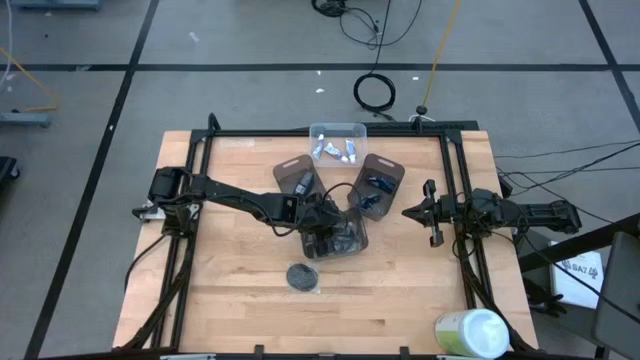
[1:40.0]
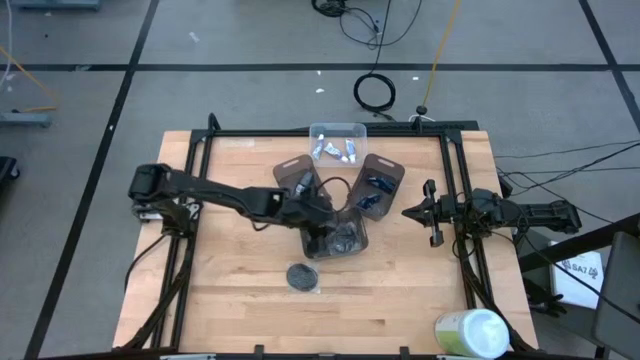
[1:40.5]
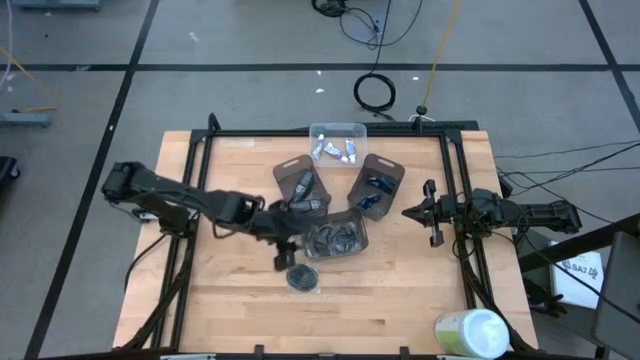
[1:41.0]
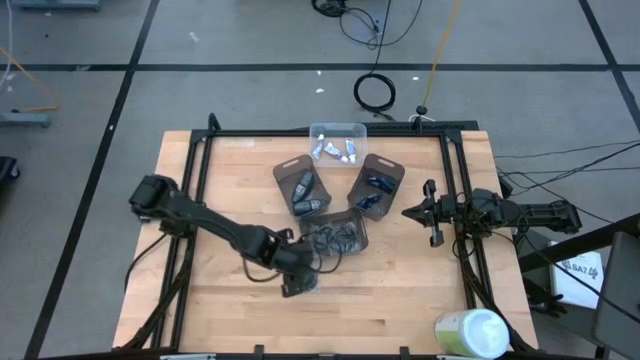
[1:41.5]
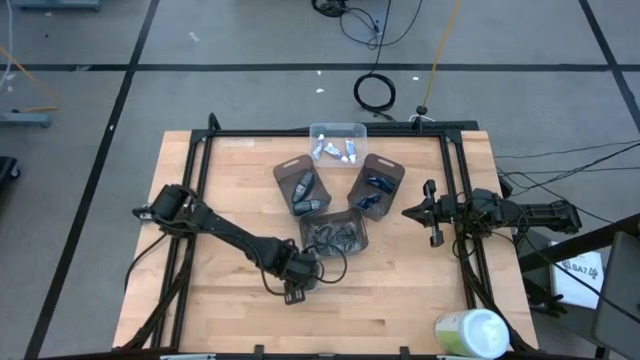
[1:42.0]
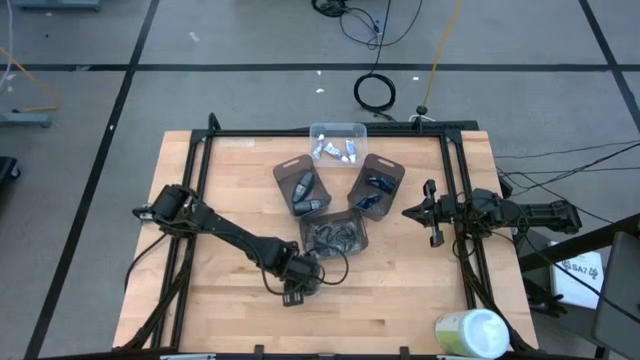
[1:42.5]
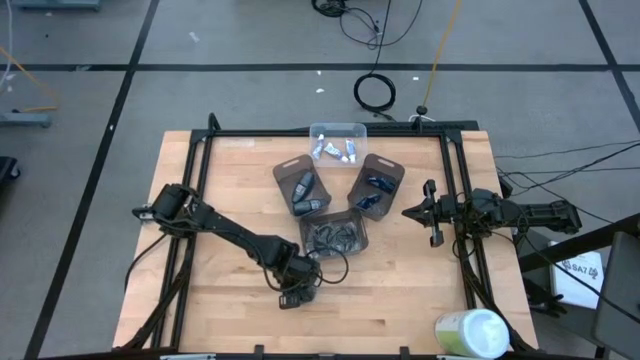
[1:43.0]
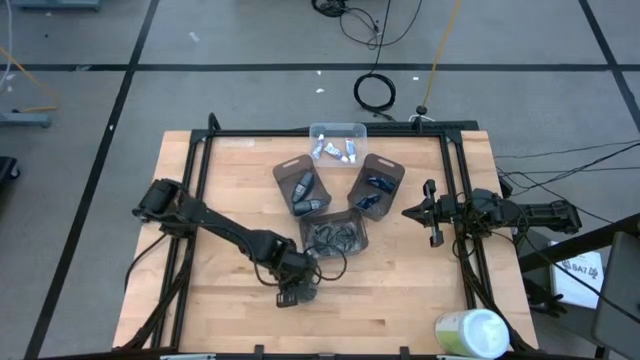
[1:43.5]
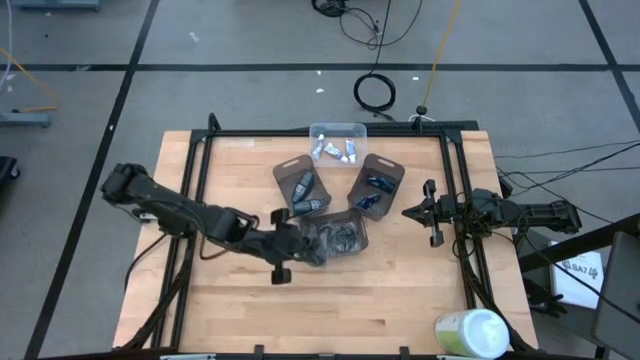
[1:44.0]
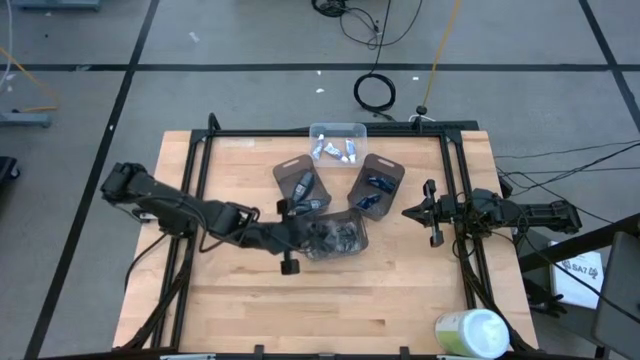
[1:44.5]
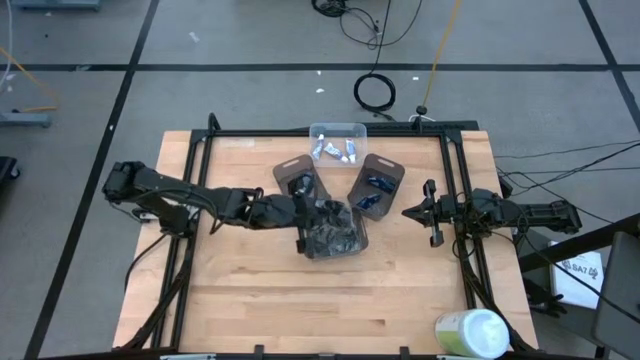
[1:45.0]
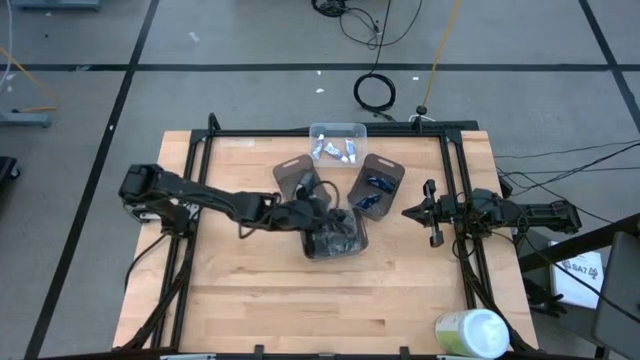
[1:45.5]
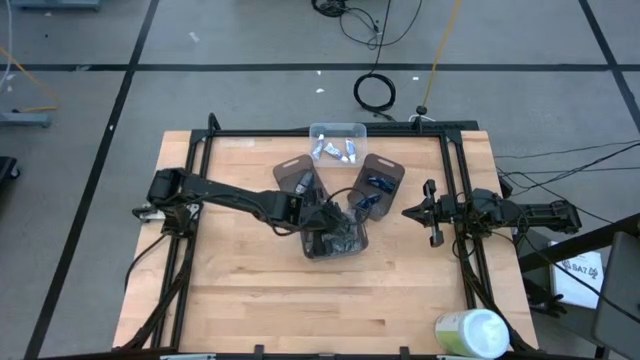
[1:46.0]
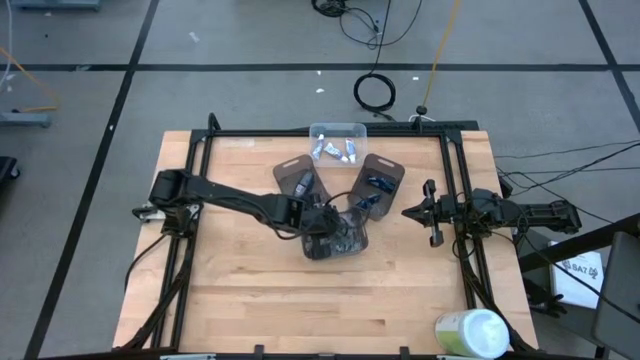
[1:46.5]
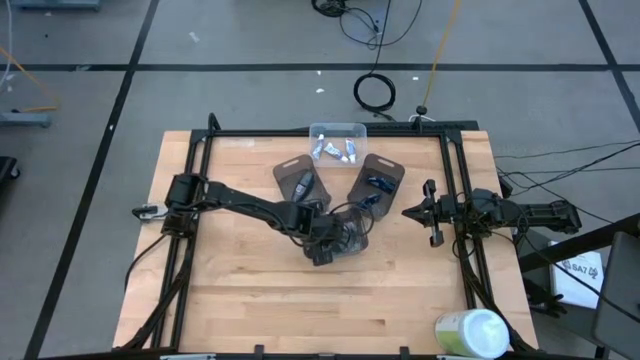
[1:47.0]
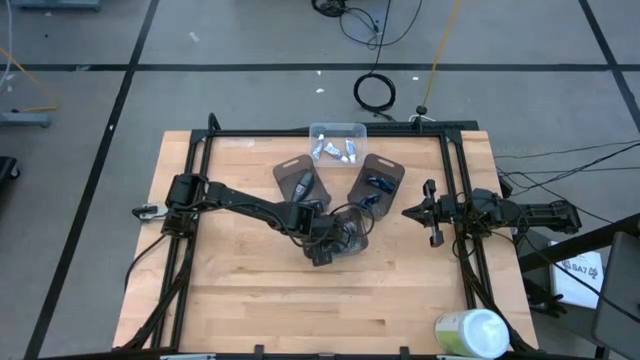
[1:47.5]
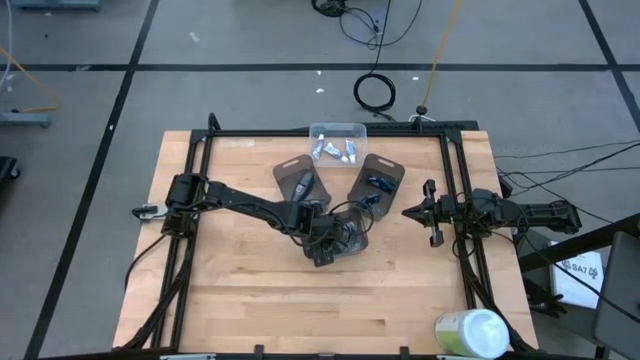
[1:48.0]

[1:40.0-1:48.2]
Task: Pick & Place Travel size toiletries
Put the black hairbrush into the bottom black transparent bin

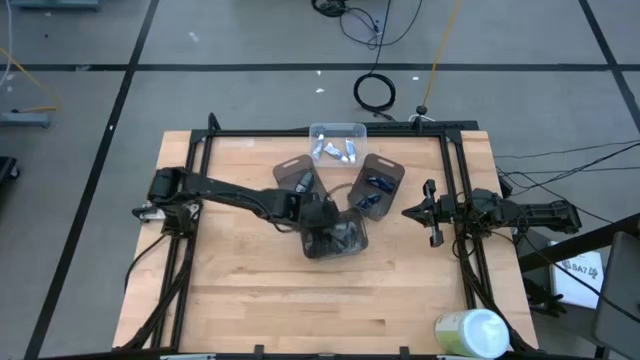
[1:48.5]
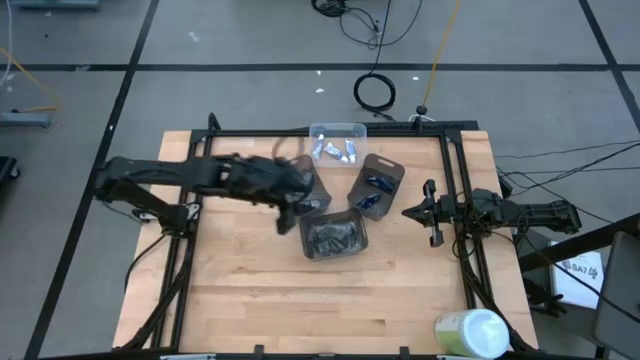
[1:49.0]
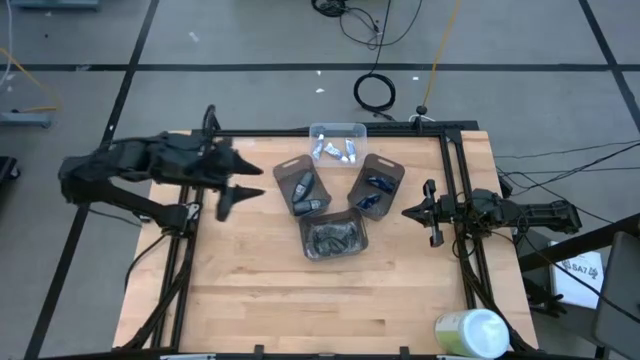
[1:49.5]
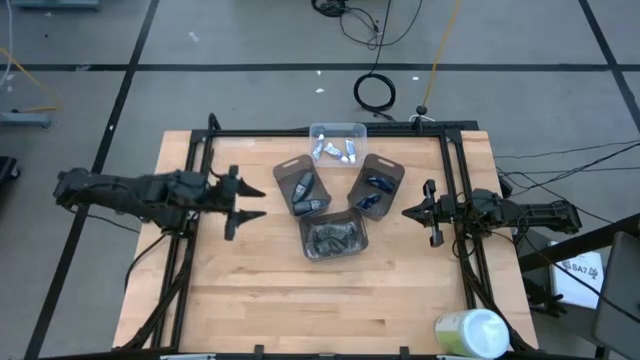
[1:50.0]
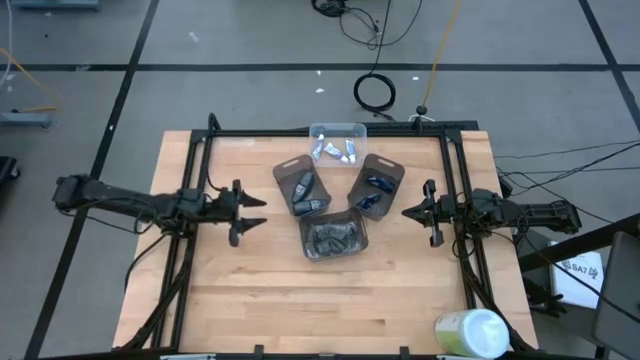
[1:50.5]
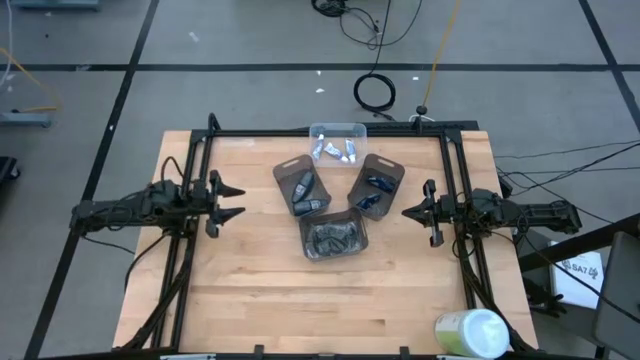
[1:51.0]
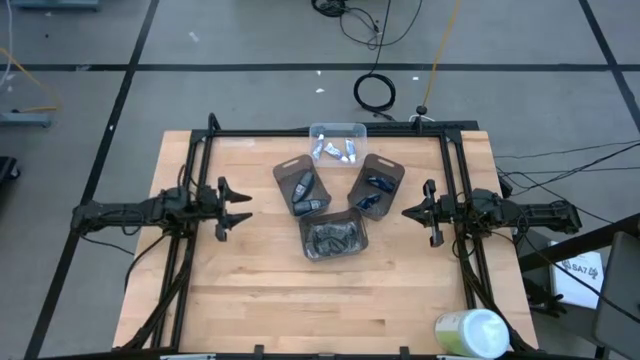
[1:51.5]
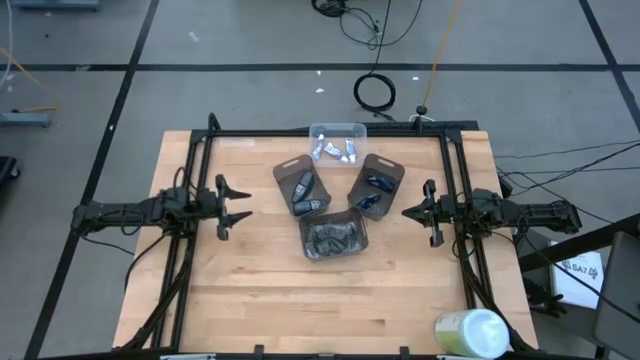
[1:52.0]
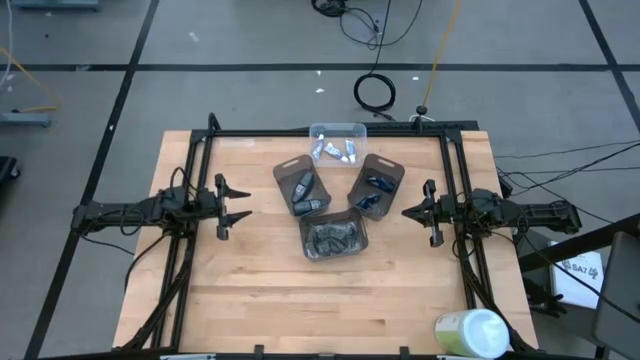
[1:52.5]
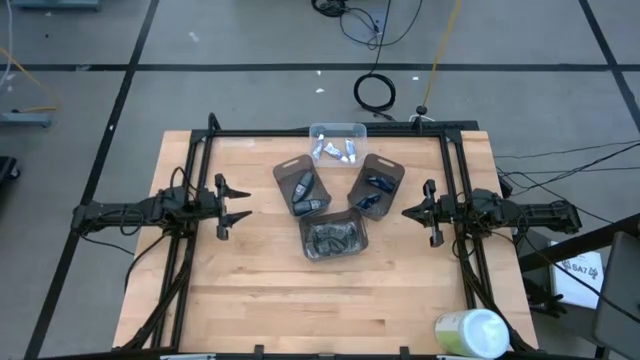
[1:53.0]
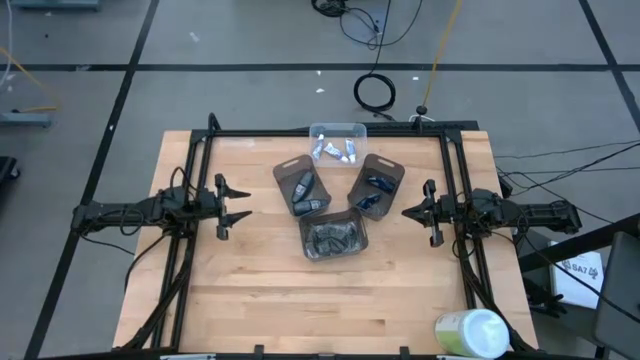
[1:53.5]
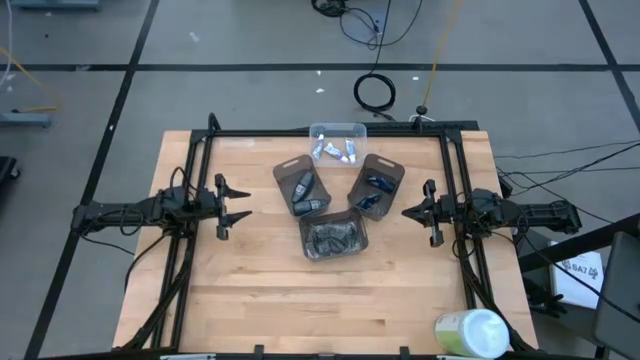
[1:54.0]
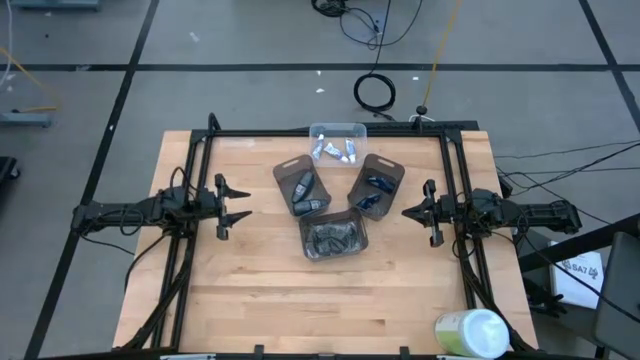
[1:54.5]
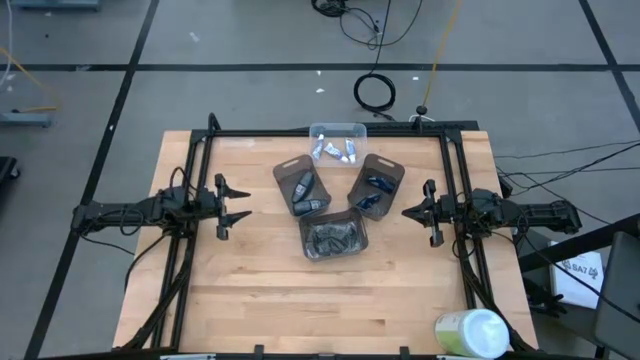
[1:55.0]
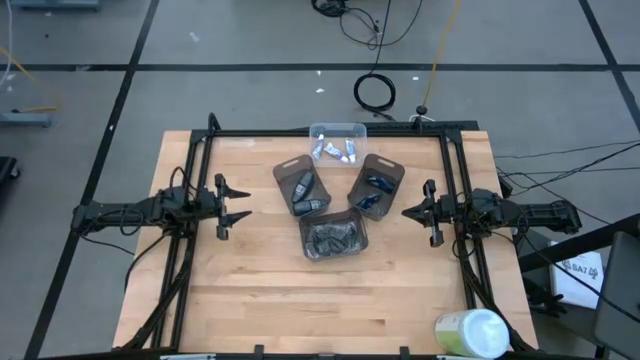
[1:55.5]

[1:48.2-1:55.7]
Return to Home Position

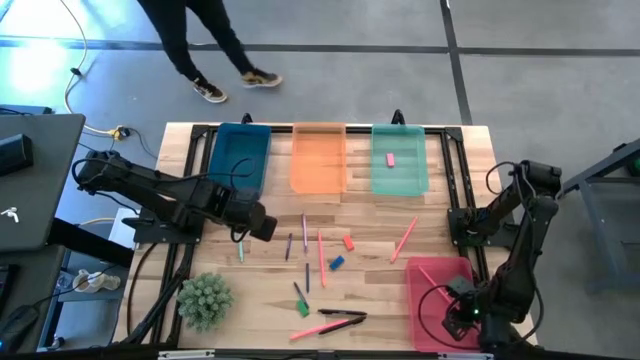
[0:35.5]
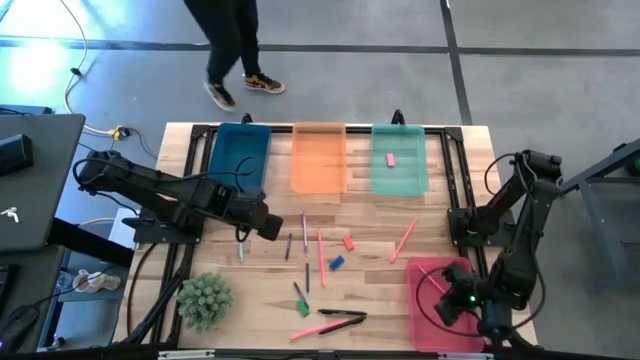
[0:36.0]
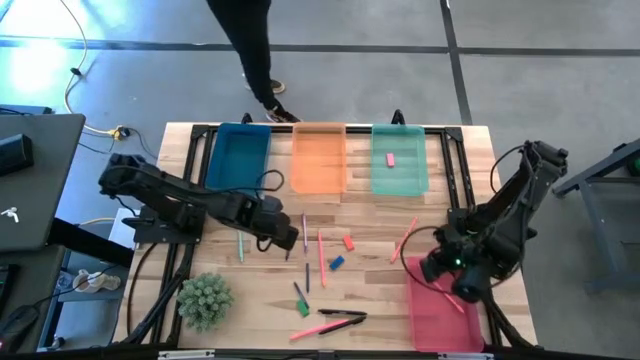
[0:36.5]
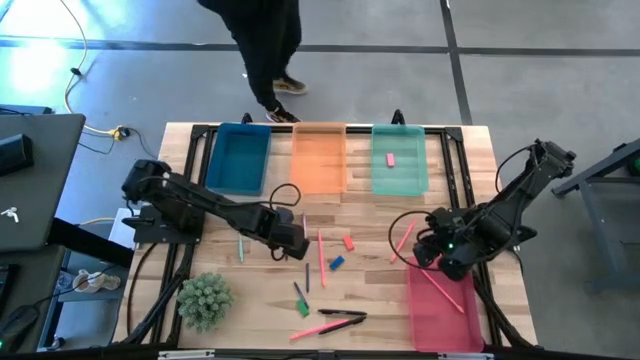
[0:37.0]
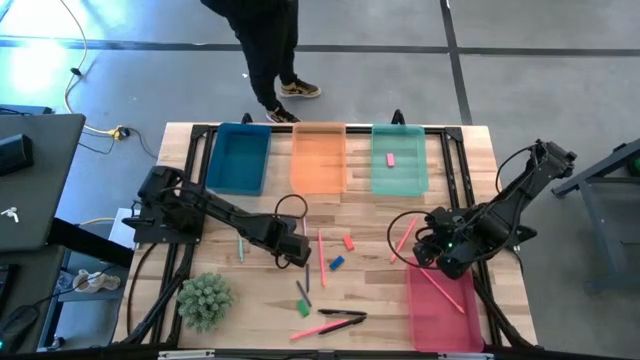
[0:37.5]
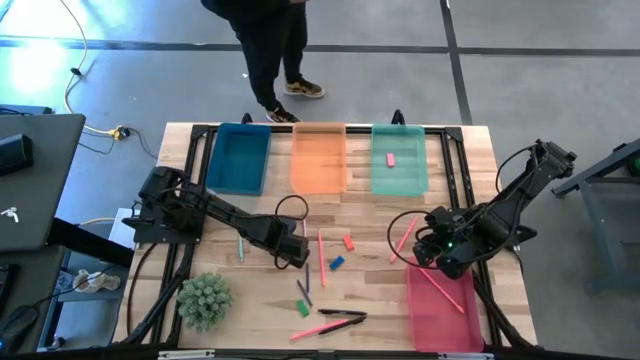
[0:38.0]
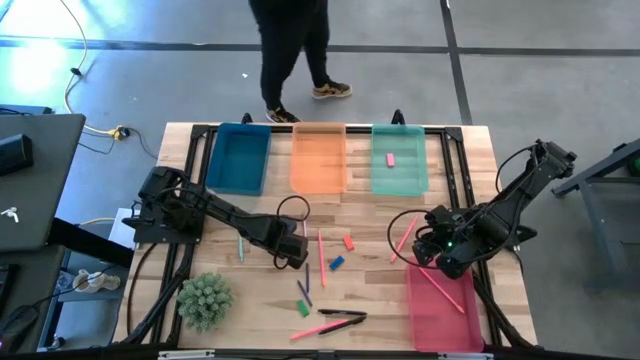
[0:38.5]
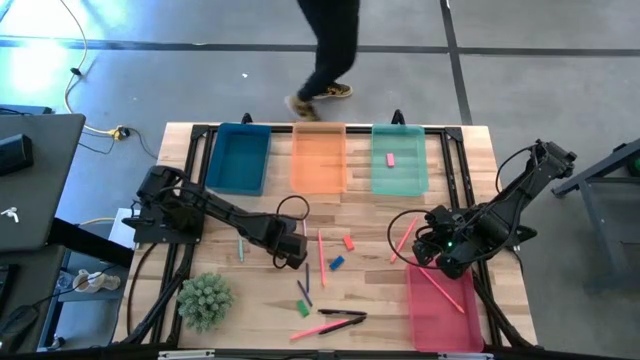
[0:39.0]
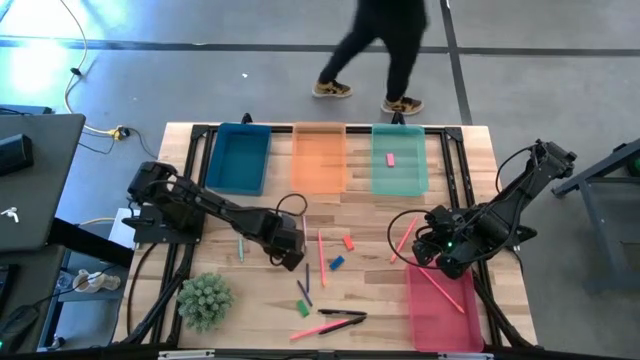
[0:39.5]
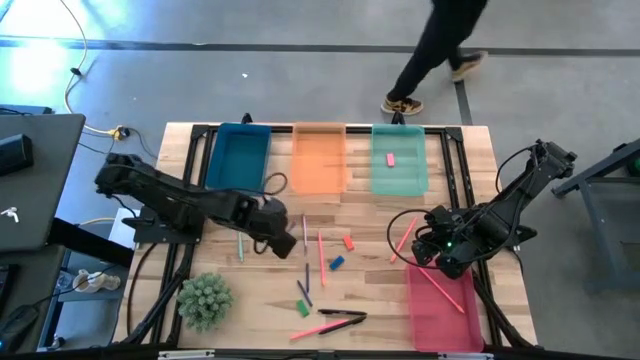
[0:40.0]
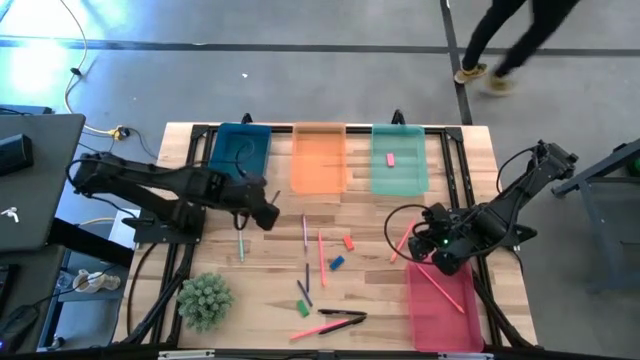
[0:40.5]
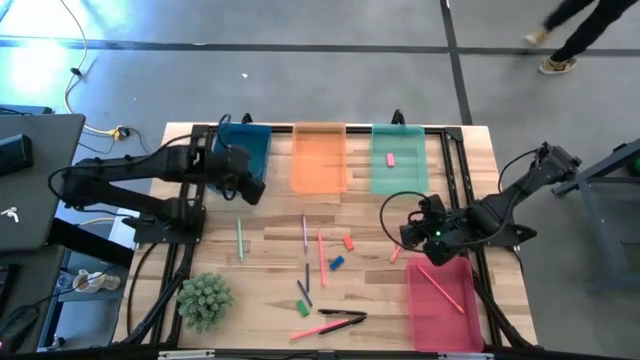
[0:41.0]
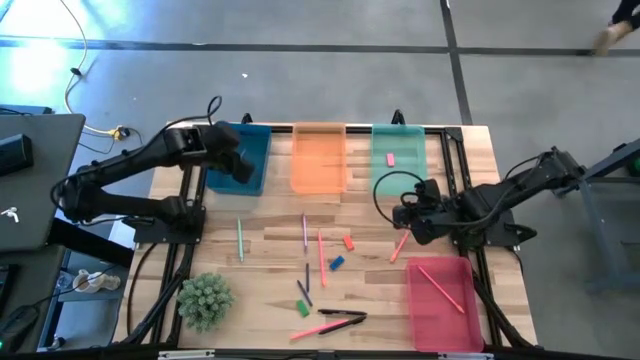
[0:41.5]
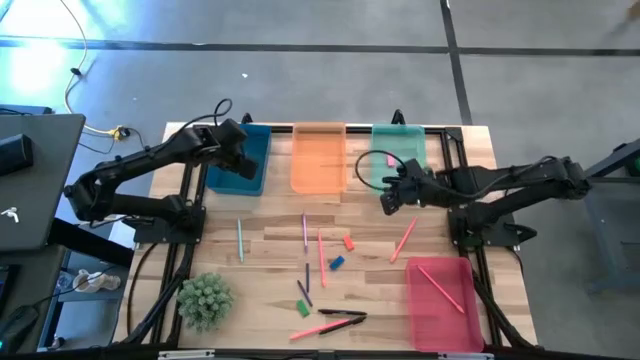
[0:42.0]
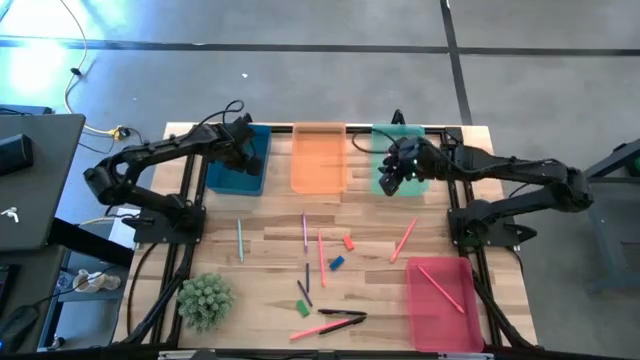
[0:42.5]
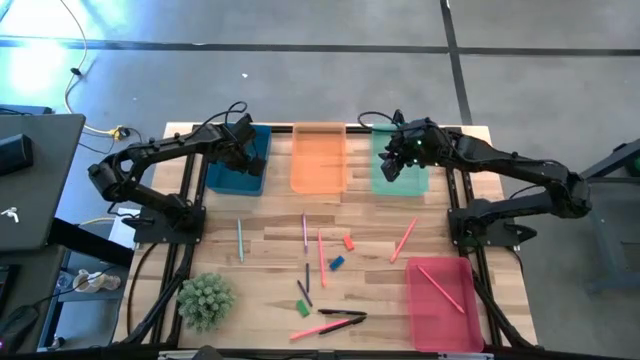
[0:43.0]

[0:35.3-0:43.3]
Task: Sort crayons/erasers/pens/pencils in bins
Put the top blue crayon into the blue bin
